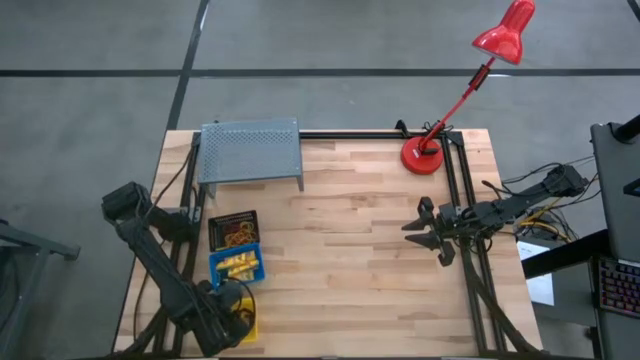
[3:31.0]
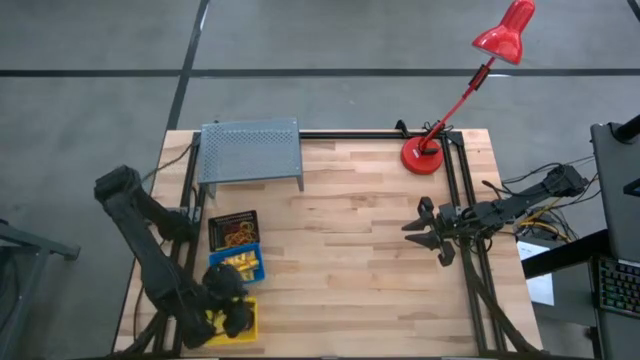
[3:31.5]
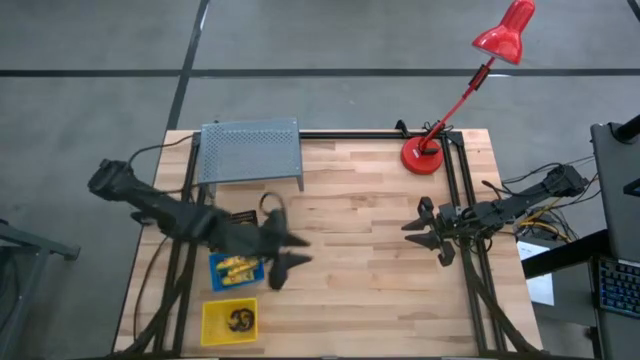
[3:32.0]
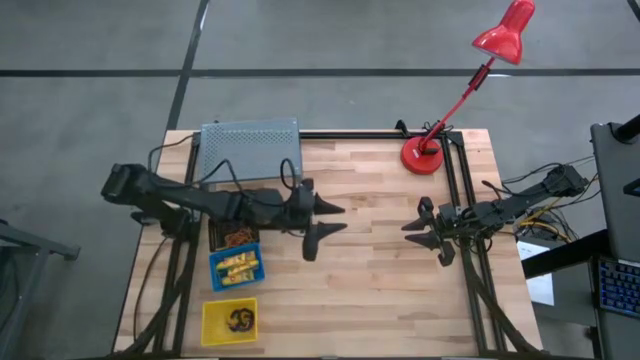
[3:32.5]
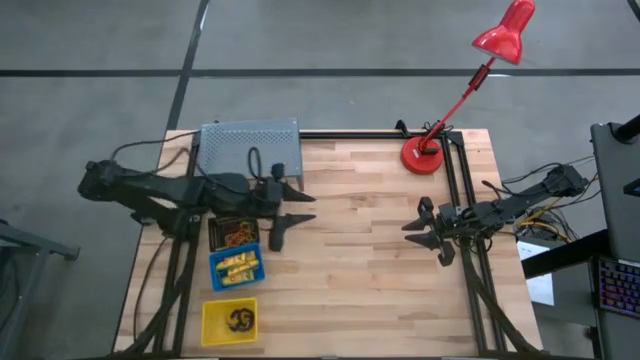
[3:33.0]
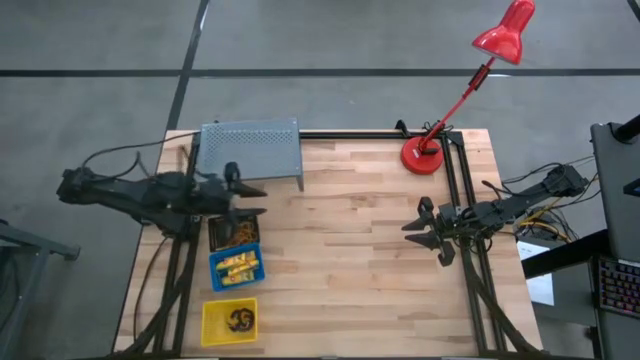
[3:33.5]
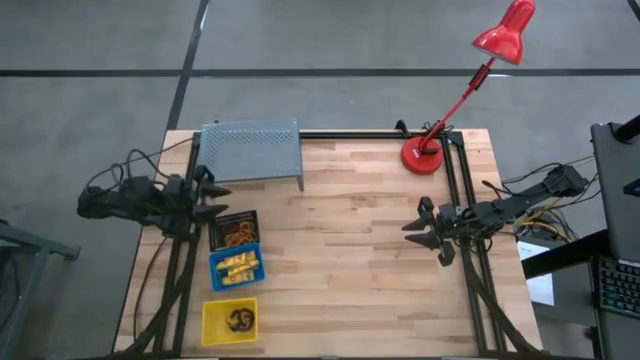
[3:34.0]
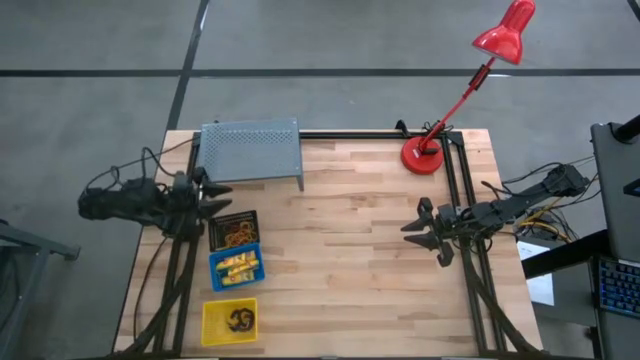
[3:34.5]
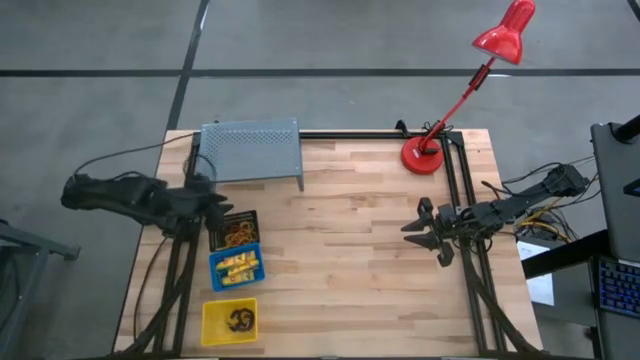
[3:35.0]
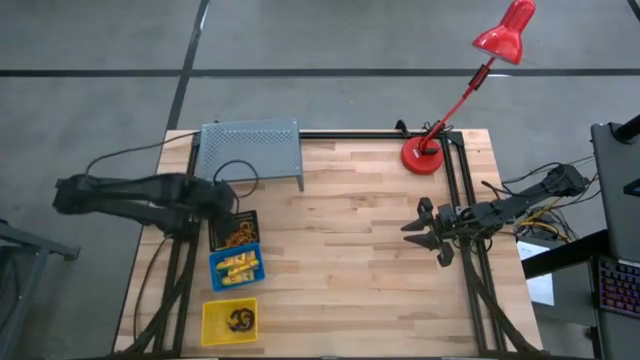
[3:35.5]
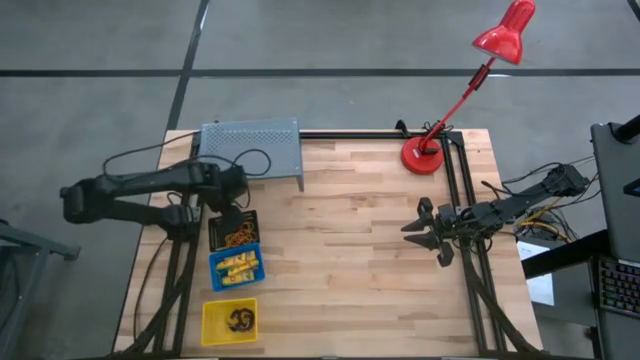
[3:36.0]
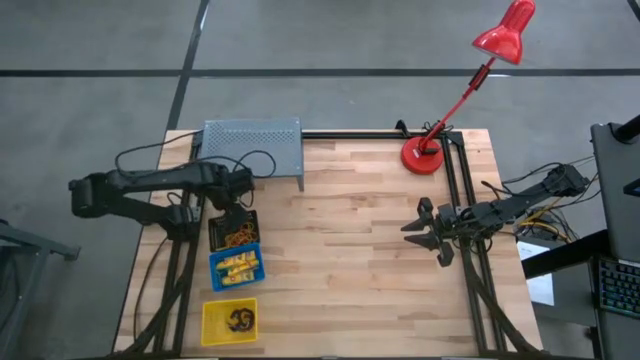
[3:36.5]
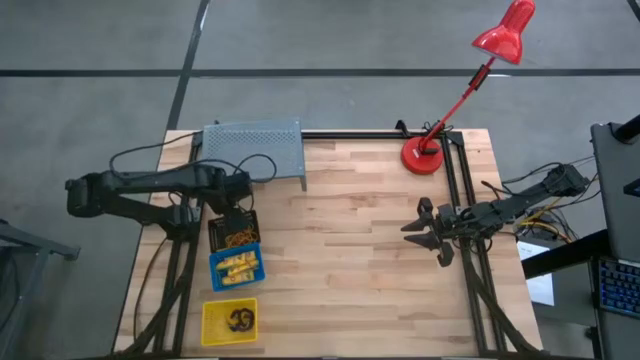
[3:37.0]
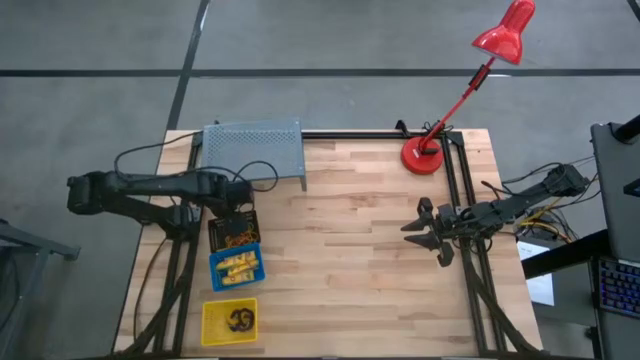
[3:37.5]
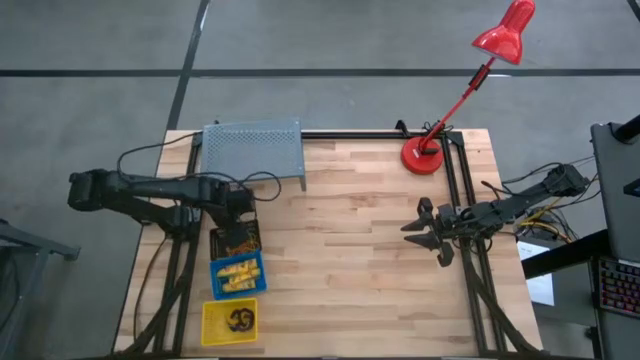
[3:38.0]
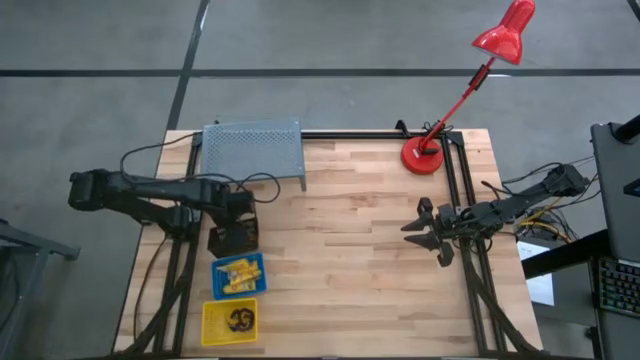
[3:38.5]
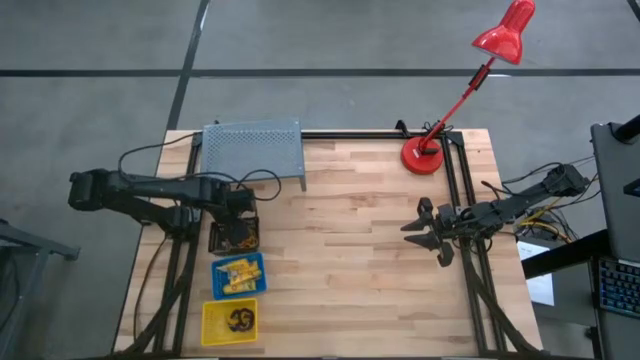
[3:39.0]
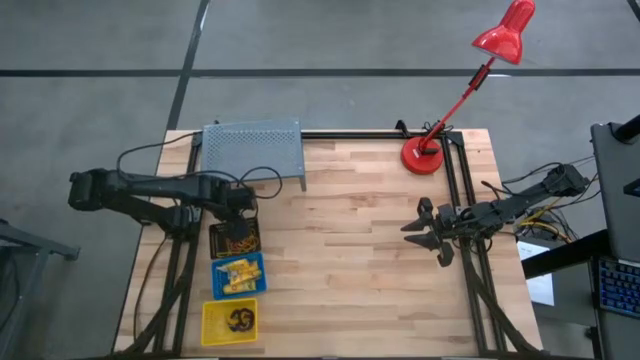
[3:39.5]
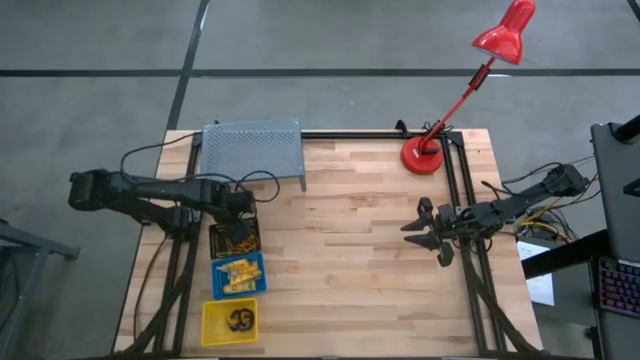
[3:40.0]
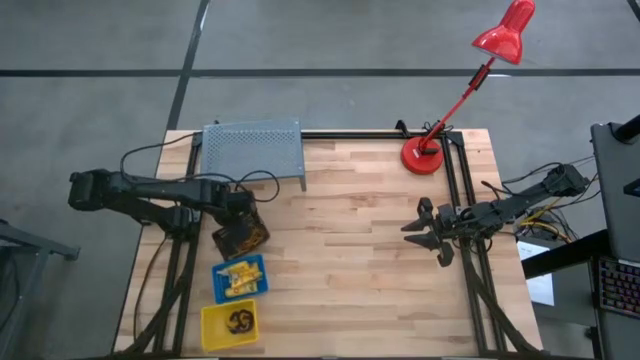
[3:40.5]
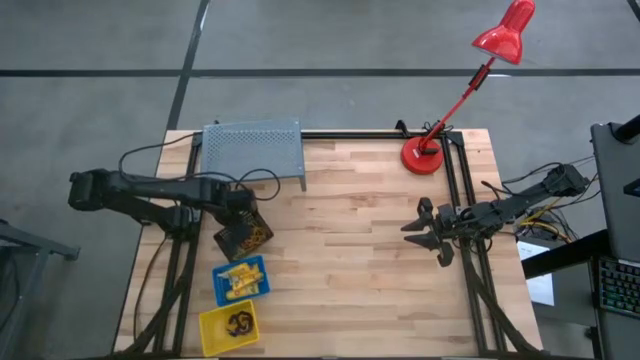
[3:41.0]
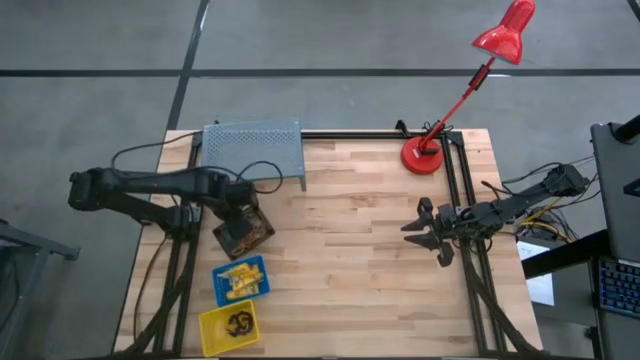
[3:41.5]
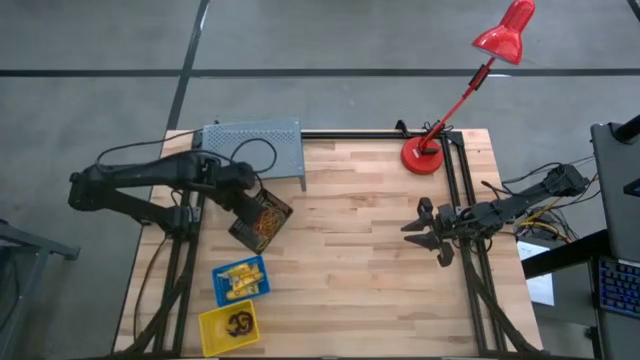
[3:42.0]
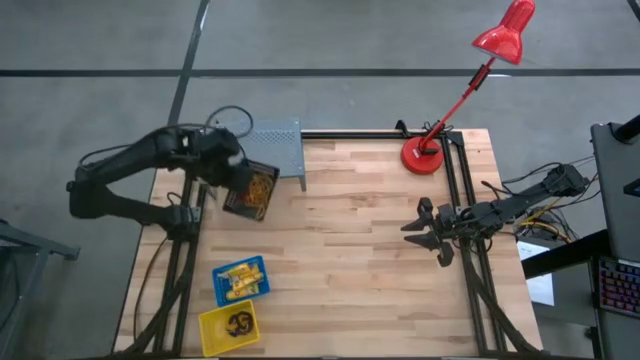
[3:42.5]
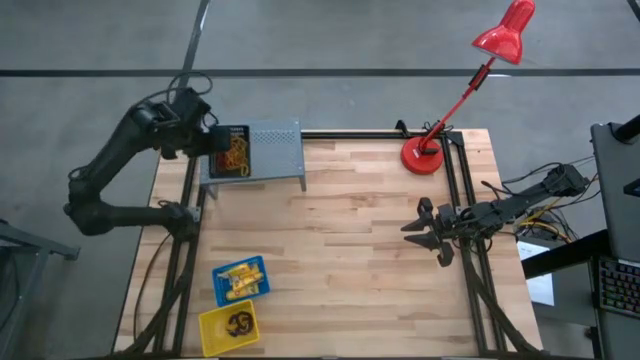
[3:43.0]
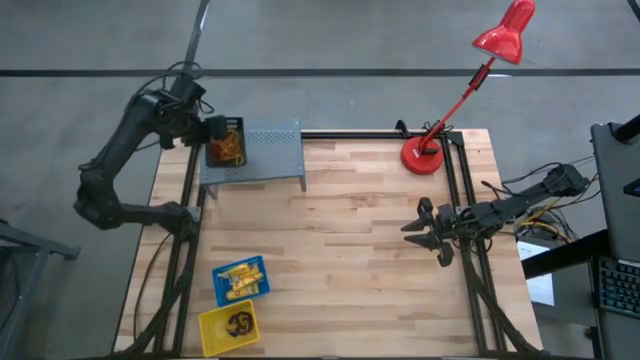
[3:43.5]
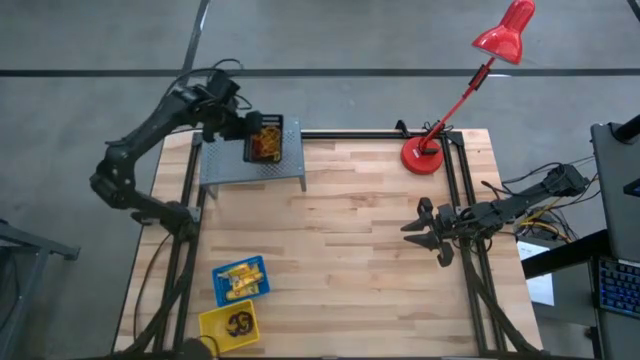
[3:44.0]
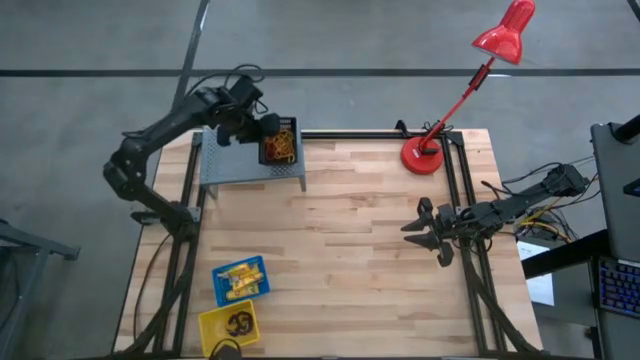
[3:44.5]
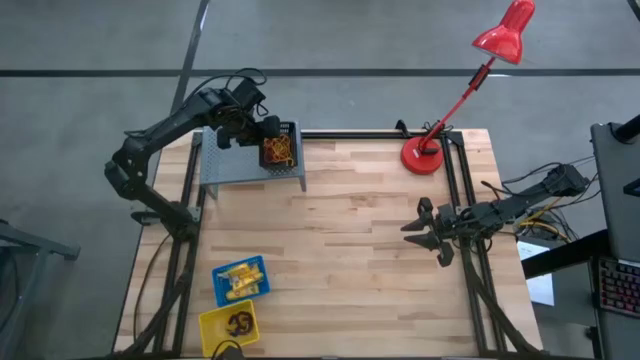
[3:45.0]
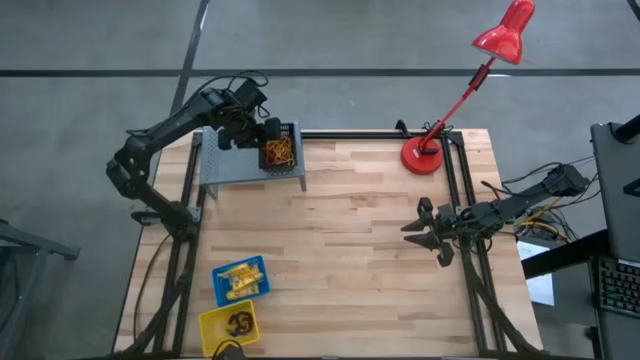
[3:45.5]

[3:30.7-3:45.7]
Task: Pick & Place Office Desk Supplies
Put the black bin with rubber bands on the shelf

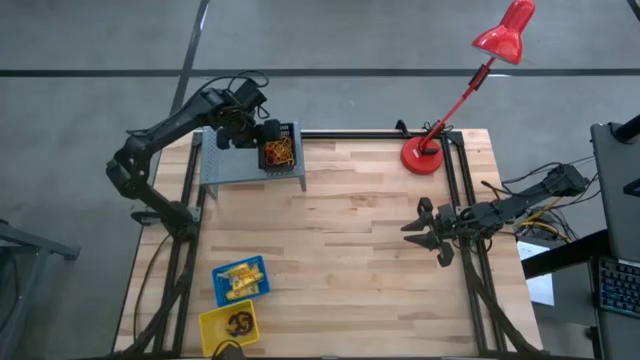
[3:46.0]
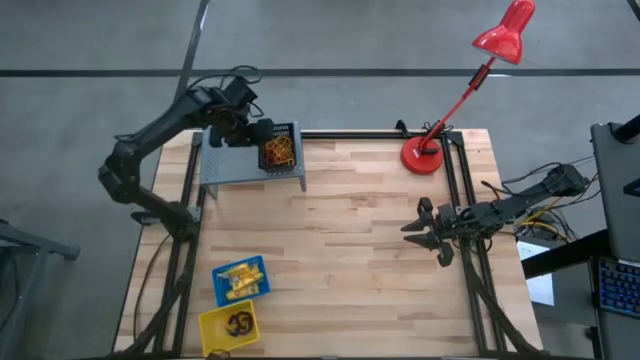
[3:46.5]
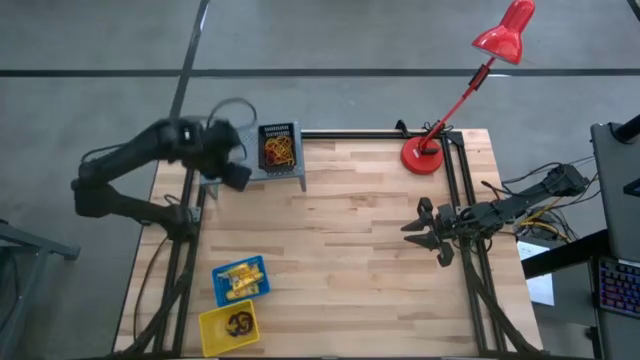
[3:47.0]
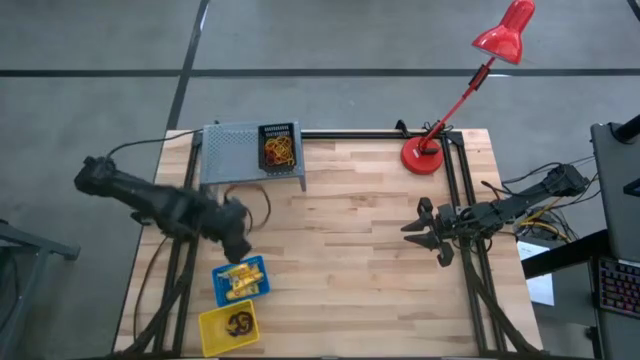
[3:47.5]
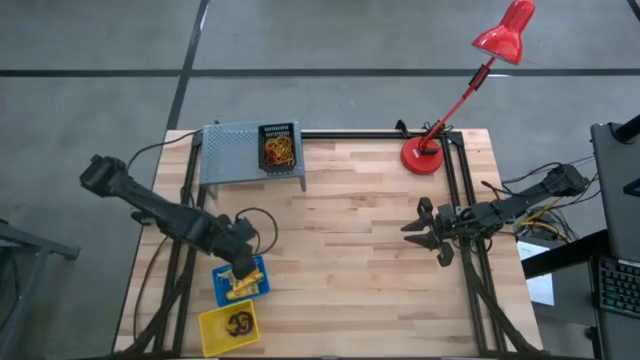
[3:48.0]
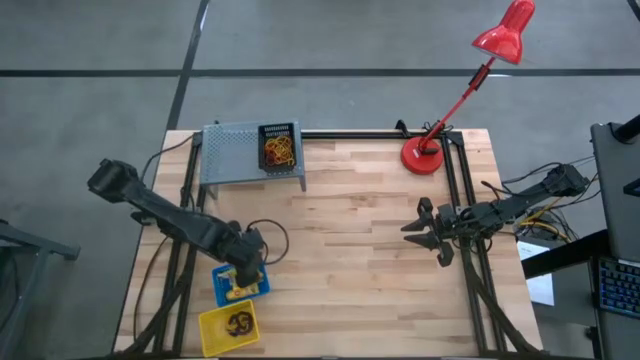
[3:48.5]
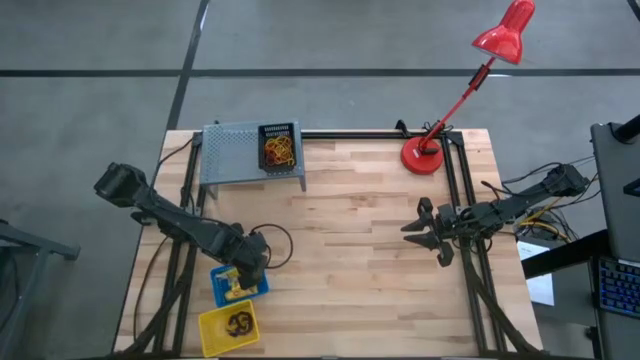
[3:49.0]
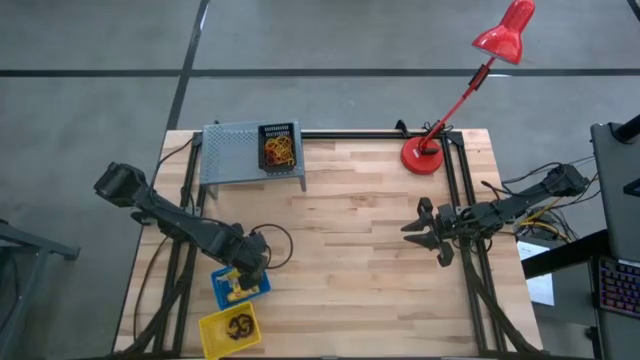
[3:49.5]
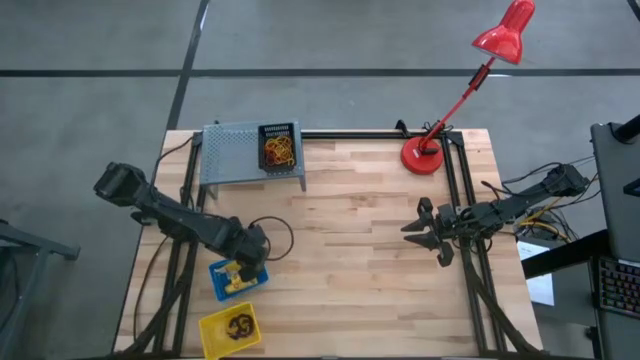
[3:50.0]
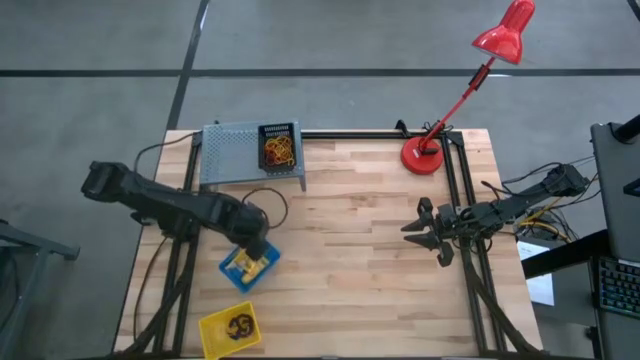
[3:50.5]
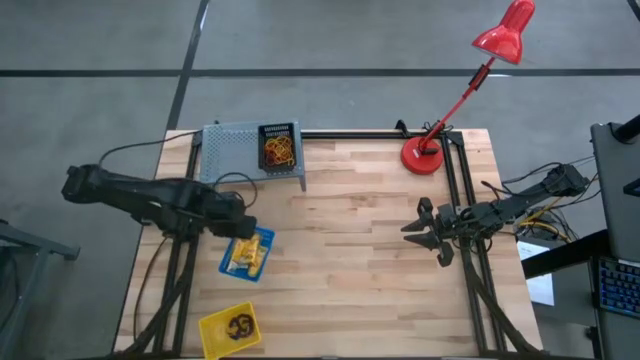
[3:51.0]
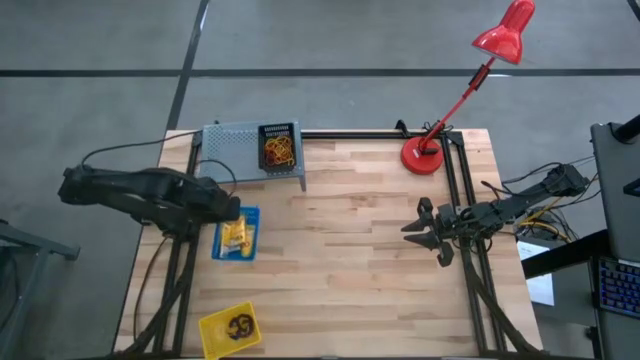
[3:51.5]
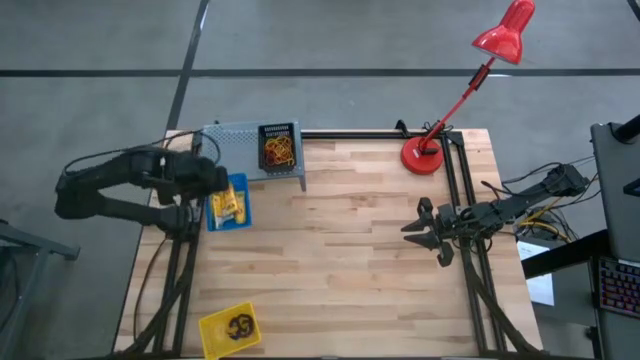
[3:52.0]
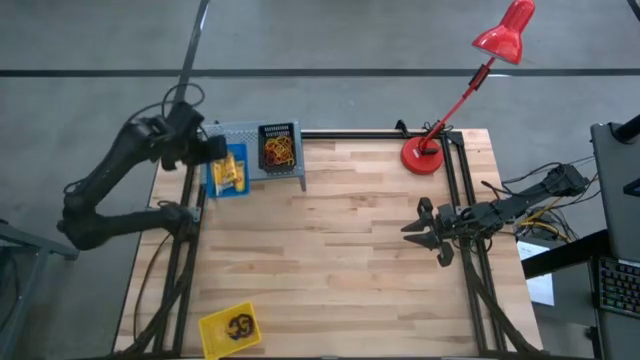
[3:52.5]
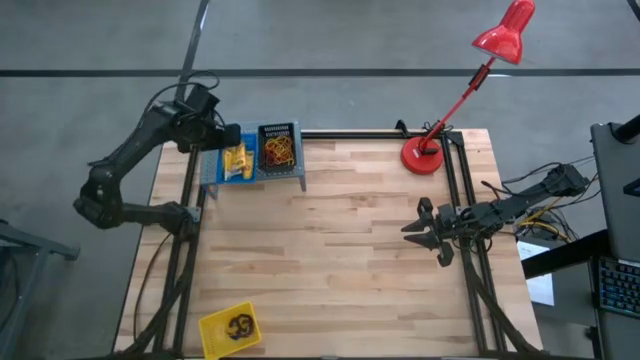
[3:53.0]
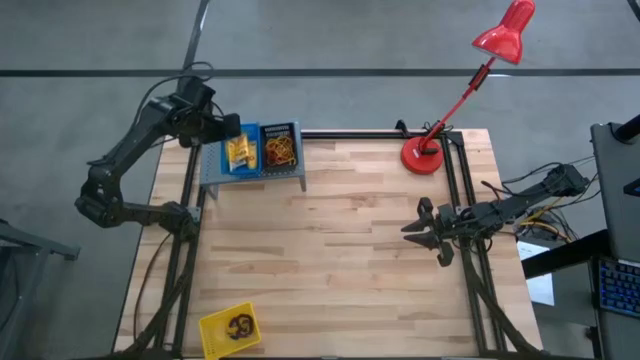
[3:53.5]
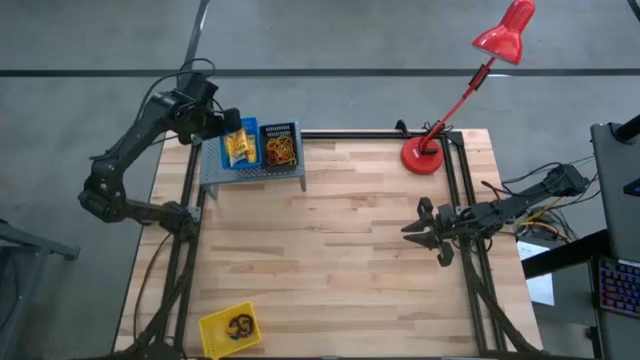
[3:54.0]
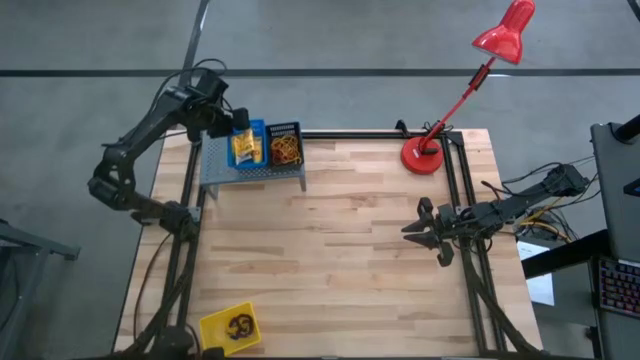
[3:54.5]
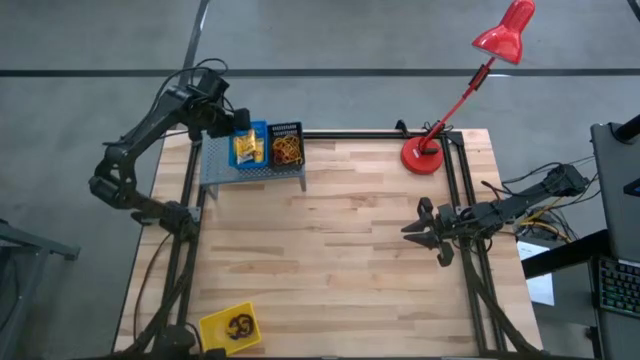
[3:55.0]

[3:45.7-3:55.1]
Put the blue bin with crayon boxes on the shelf
